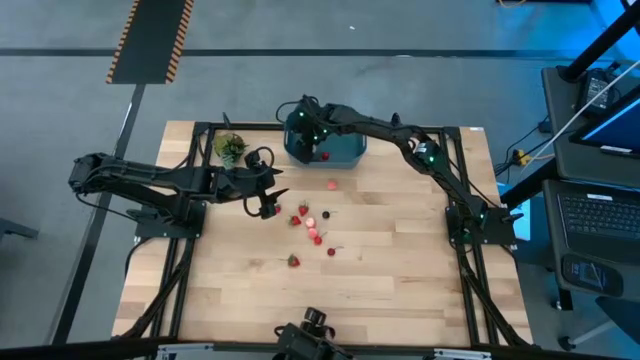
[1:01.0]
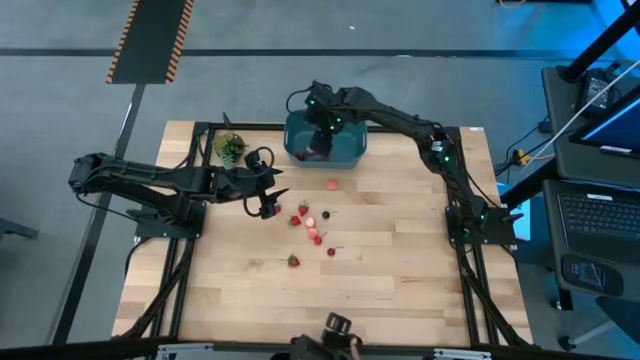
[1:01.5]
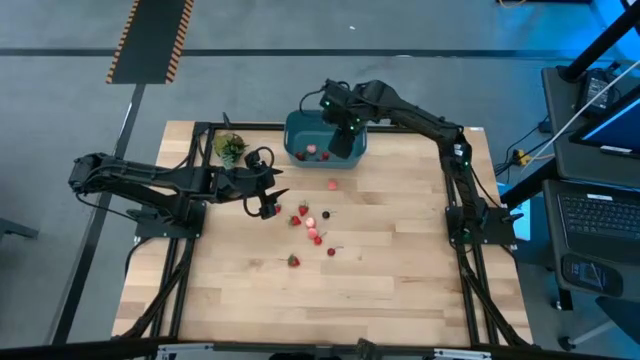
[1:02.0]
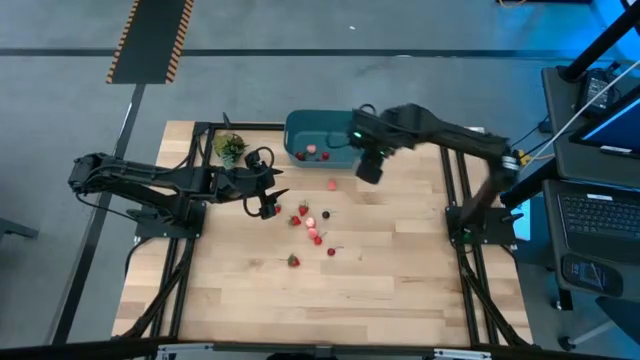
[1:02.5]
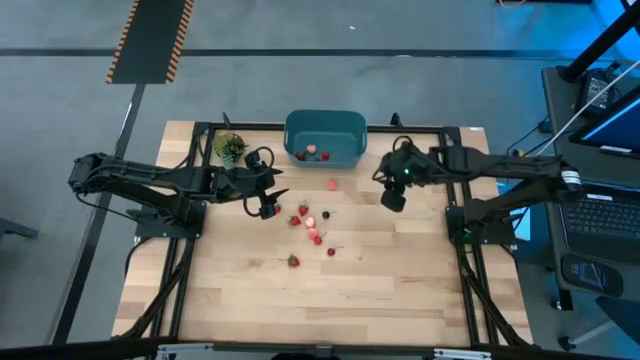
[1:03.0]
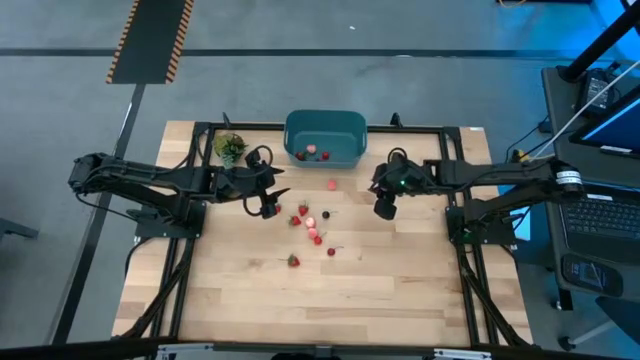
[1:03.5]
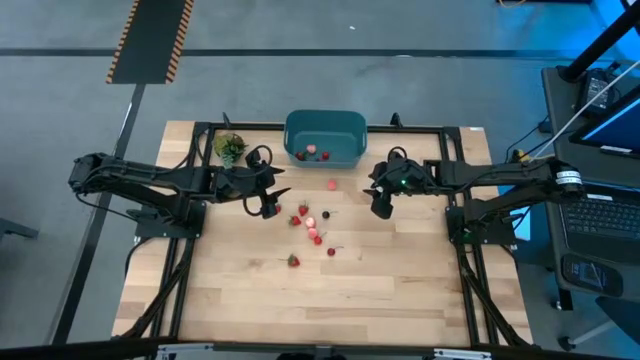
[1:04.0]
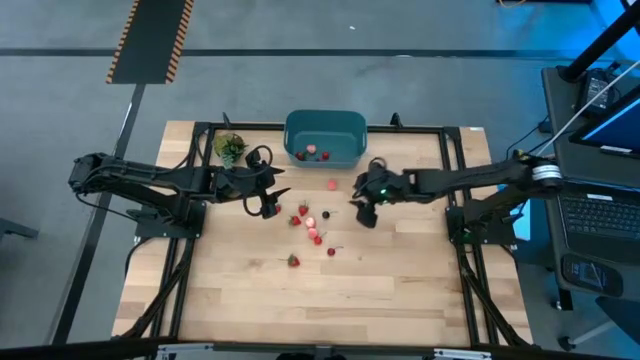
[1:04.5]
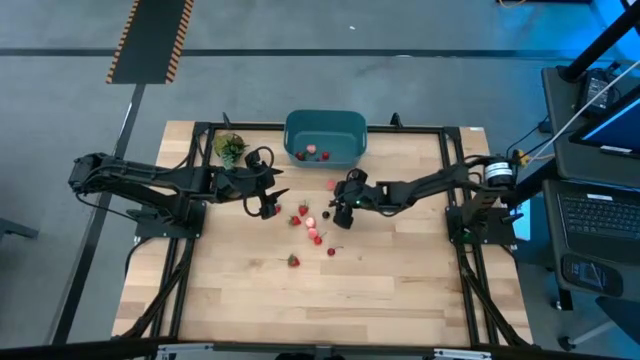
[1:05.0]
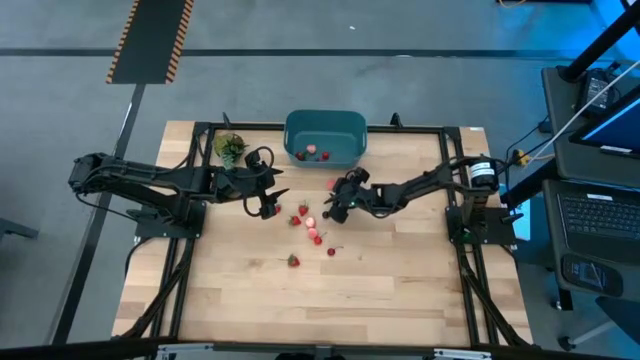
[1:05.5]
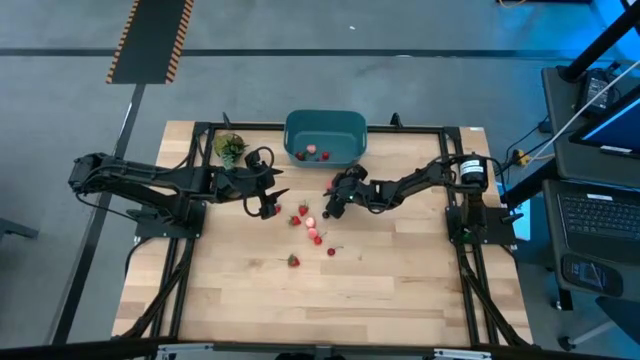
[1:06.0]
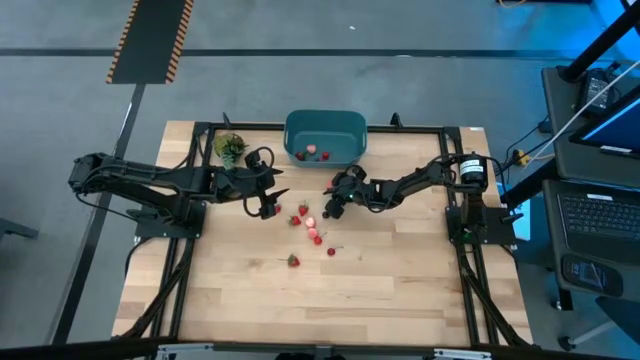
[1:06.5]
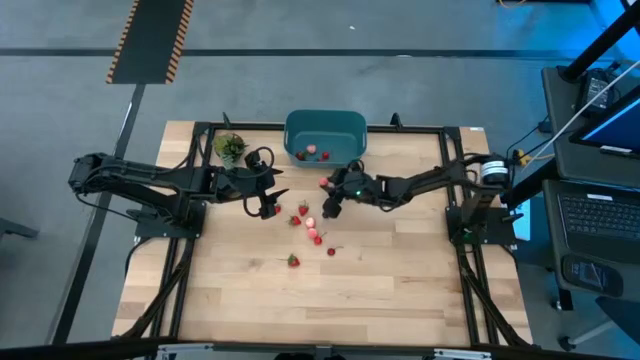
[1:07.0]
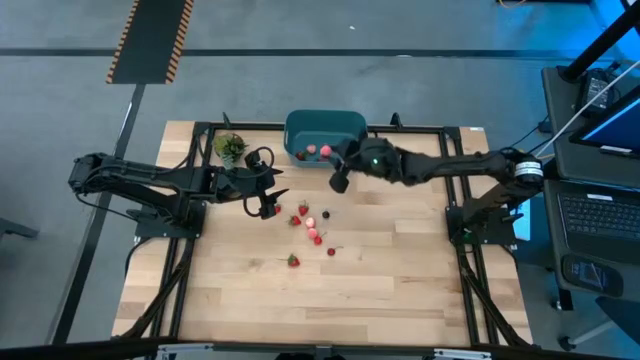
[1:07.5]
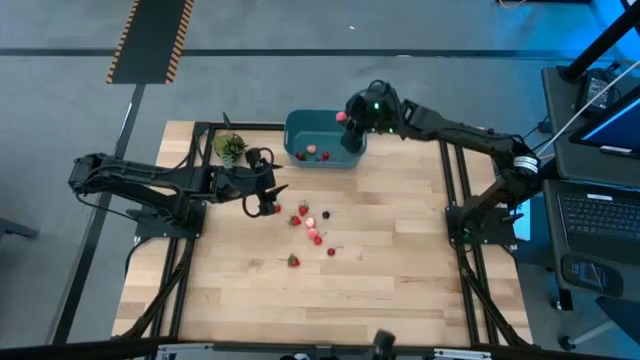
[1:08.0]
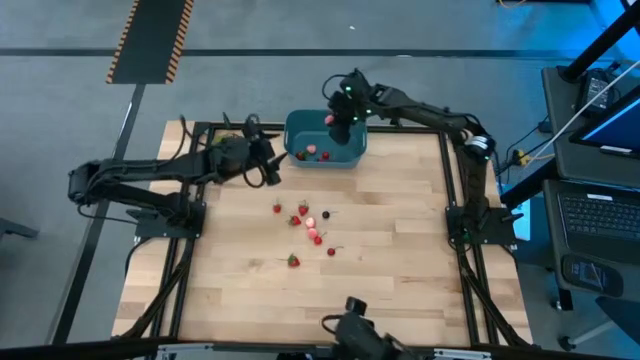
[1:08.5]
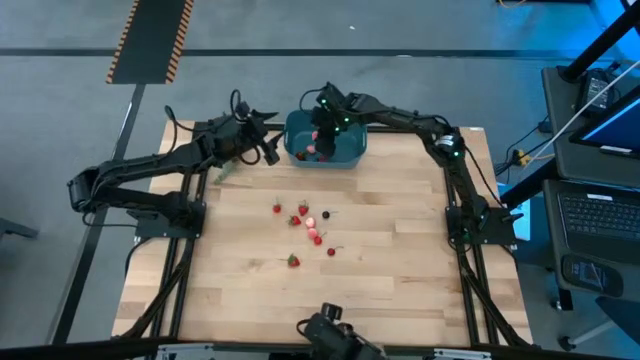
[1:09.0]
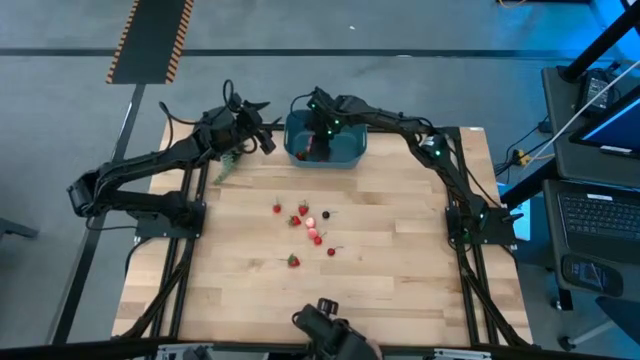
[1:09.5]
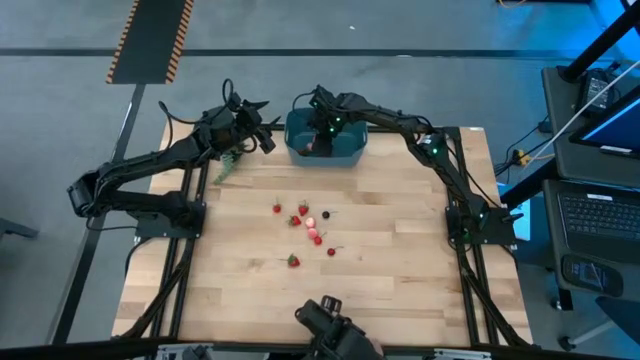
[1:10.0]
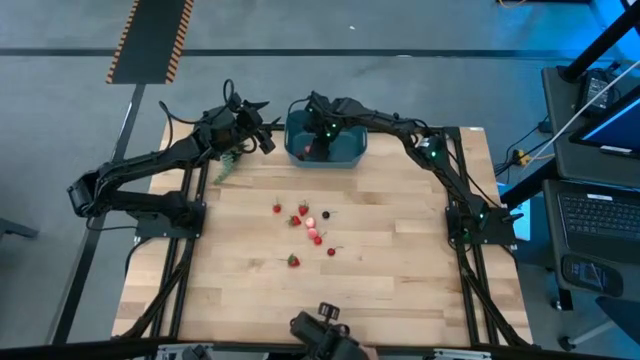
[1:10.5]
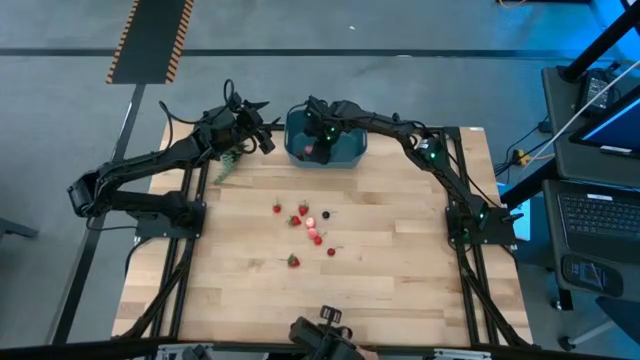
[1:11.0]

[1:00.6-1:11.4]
Task: Pick and placing Produce into tupperware
Put the peach into the blue bin

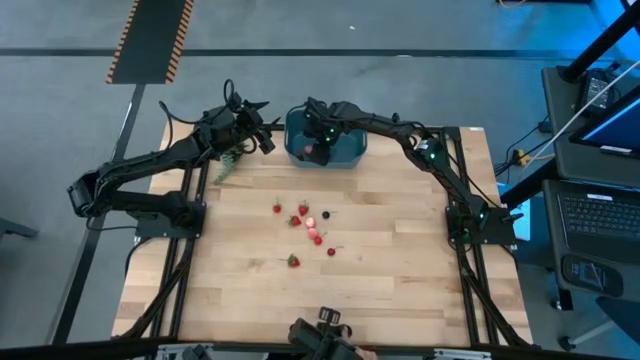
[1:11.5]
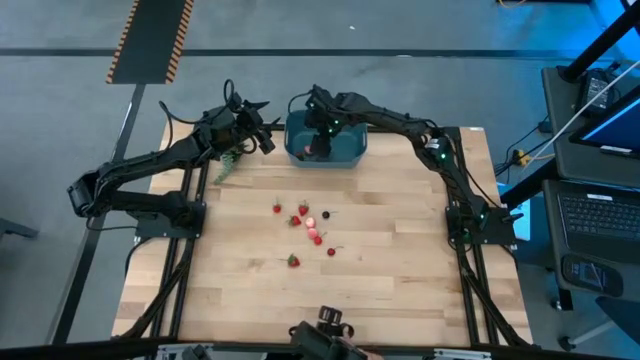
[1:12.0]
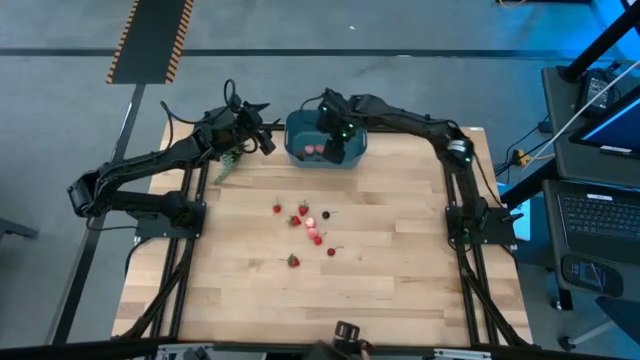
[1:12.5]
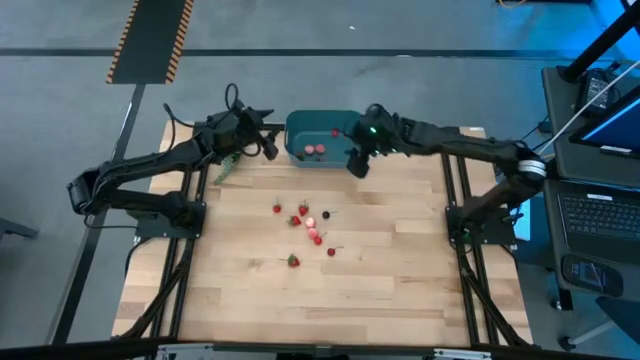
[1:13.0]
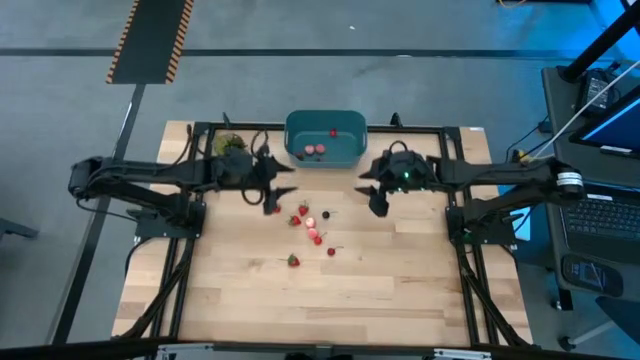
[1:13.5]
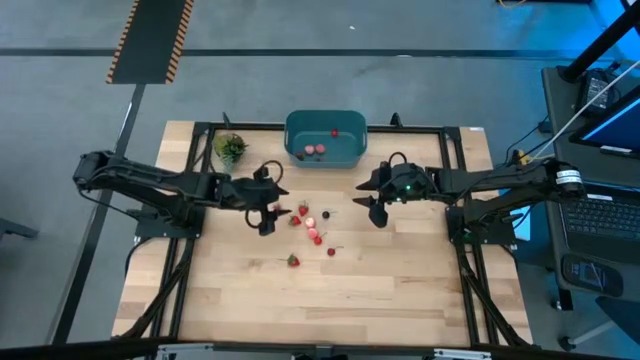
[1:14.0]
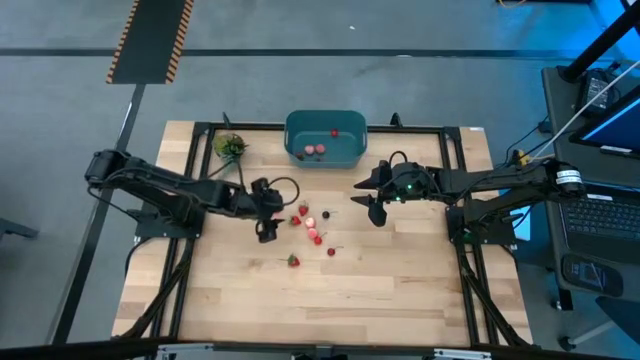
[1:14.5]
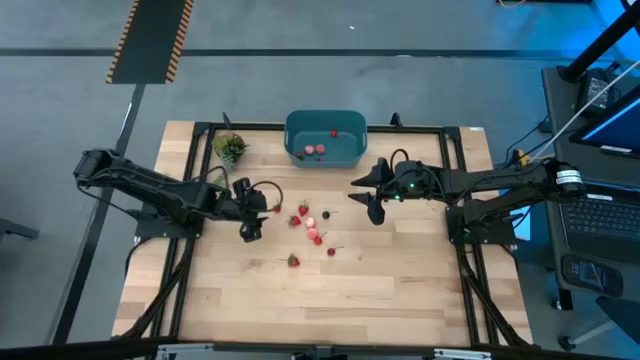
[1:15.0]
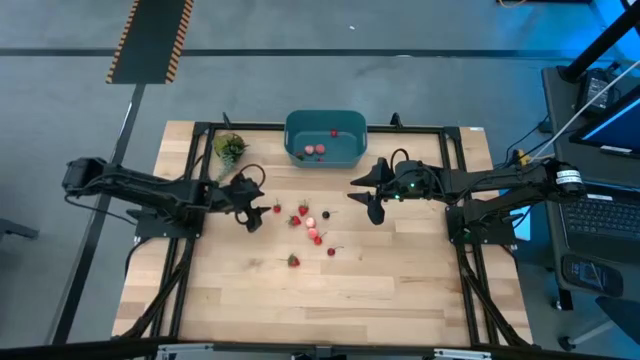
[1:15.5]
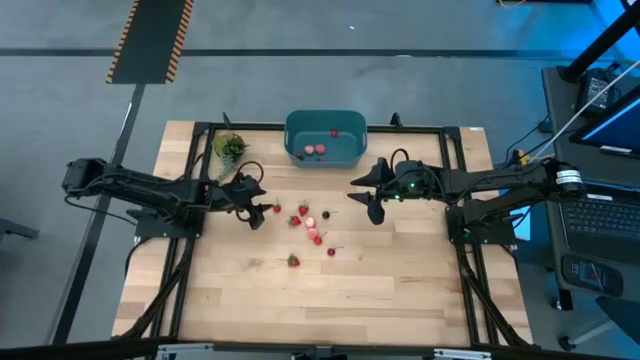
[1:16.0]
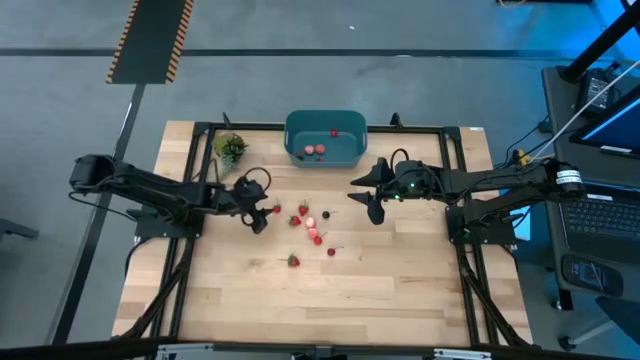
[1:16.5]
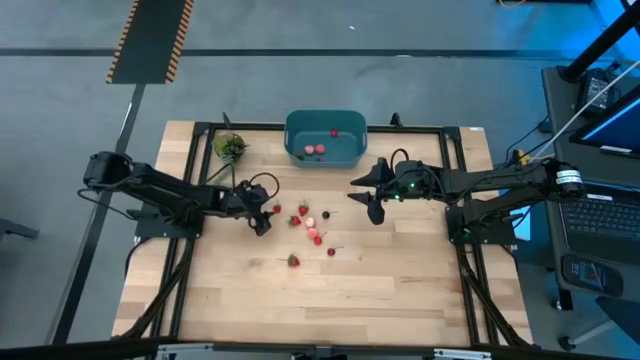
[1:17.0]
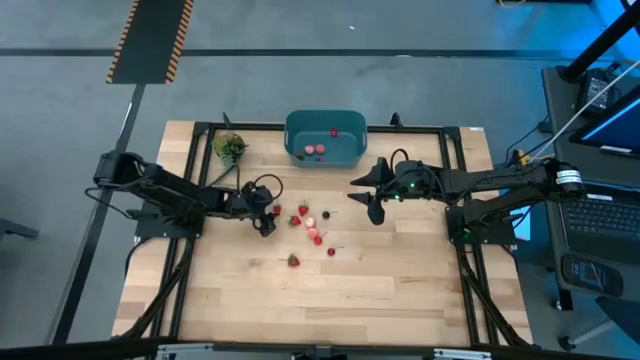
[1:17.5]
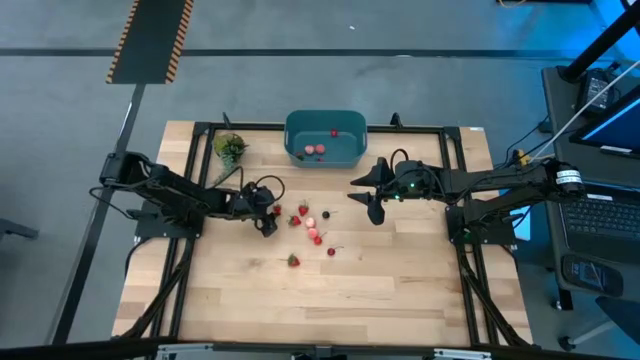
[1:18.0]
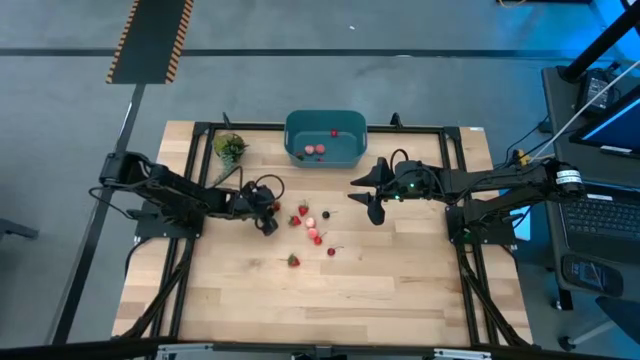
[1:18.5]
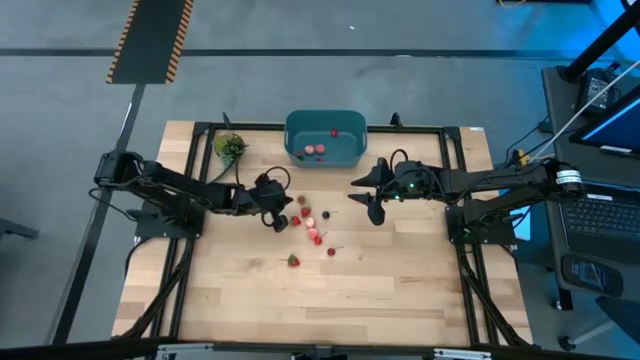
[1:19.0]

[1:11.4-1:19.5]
Put the strawberry into the blue bin

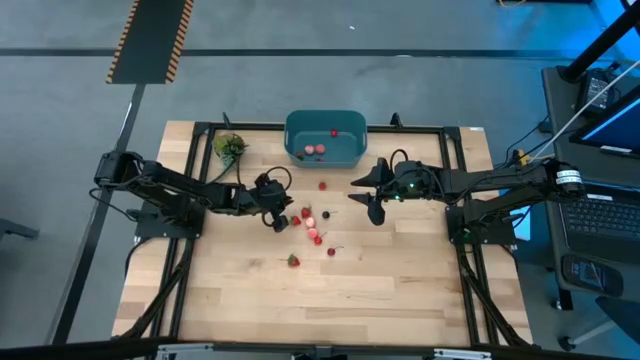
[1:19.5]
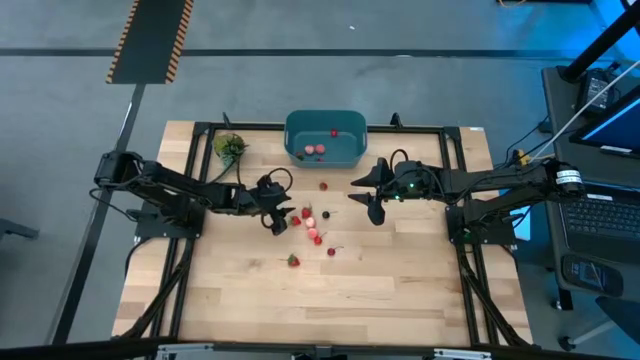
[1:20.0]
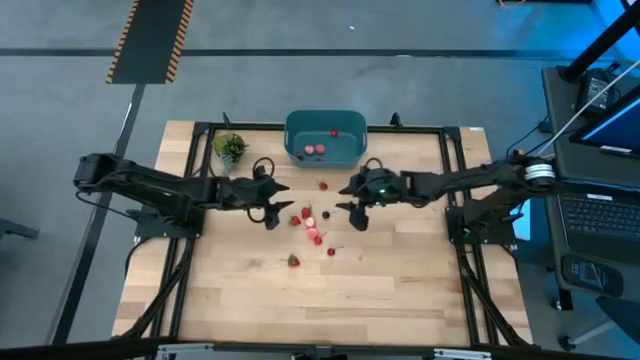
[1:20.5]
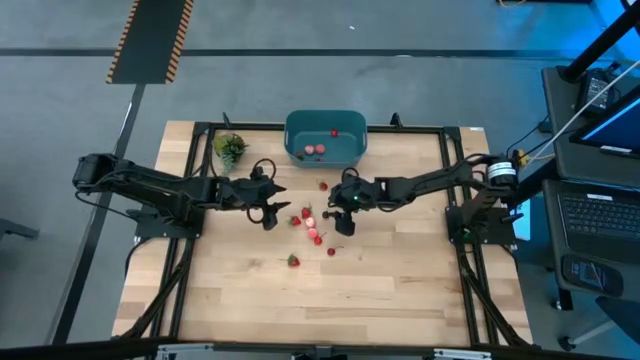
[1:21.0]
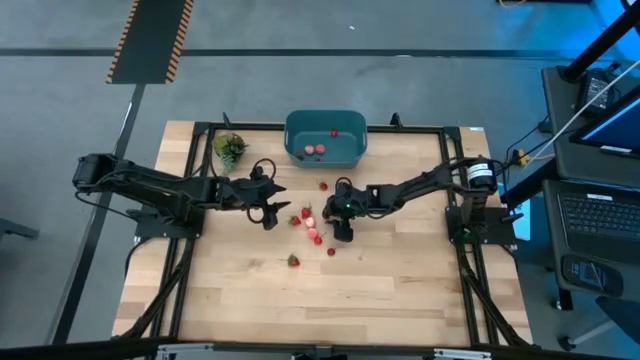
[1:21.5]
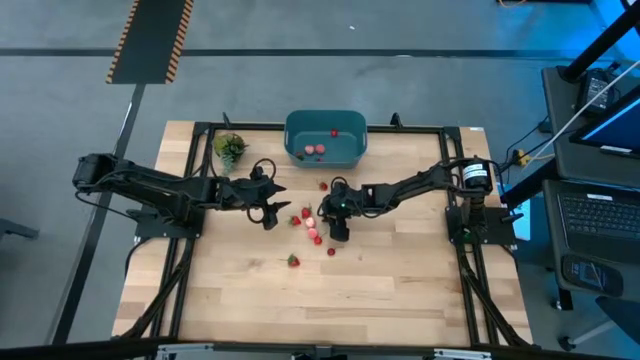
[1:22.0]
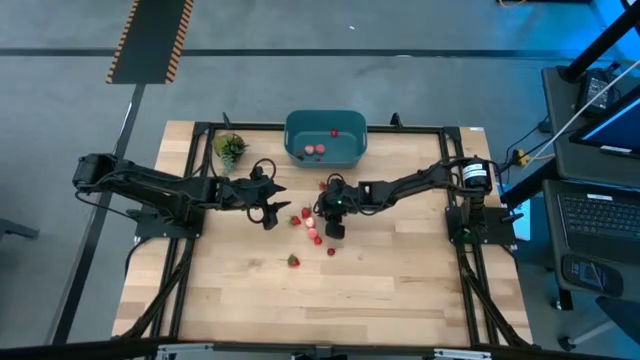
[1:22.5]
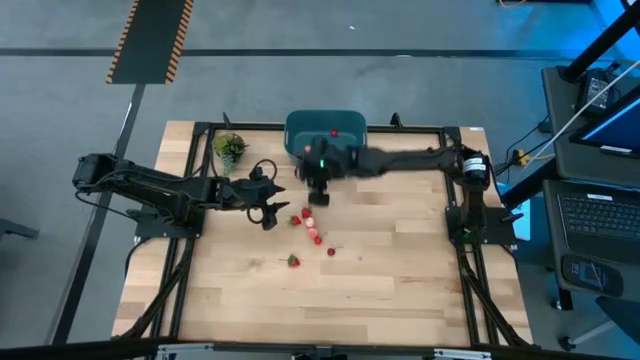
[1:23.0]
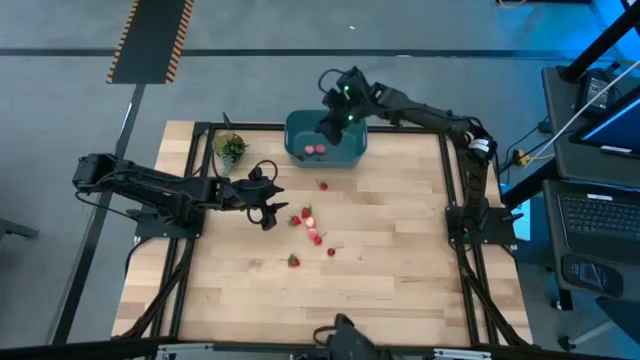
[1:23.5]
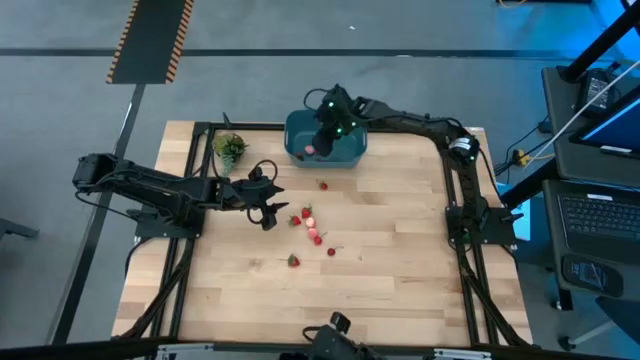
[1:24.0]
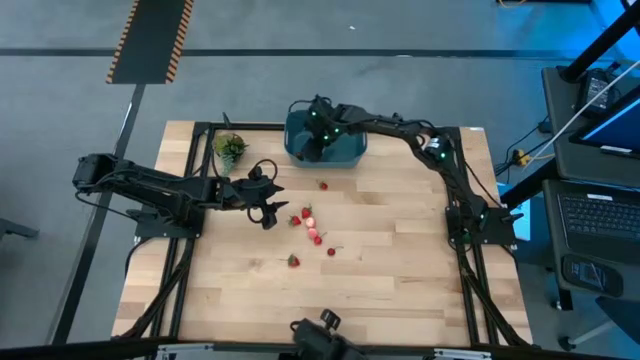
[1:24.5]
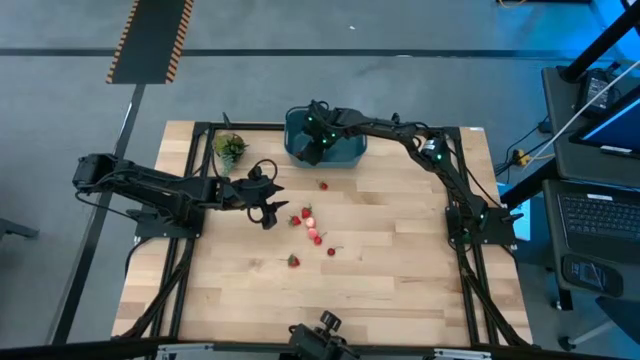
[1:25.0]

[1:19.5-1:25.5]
Put the black cherry into the blue bin
